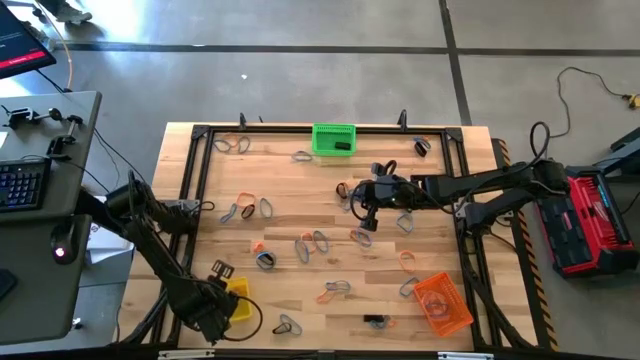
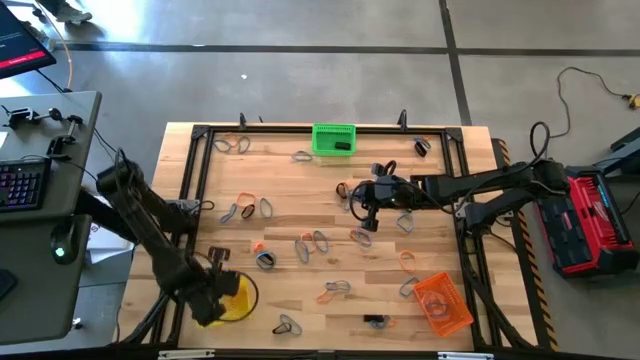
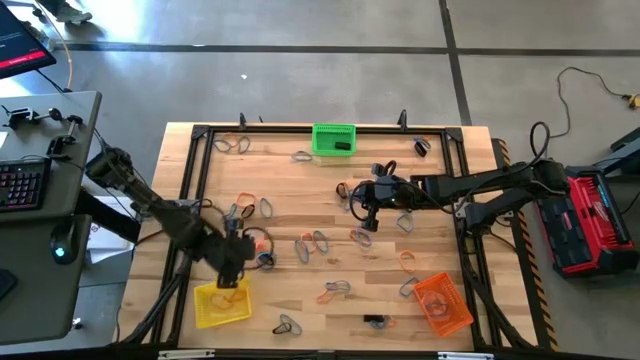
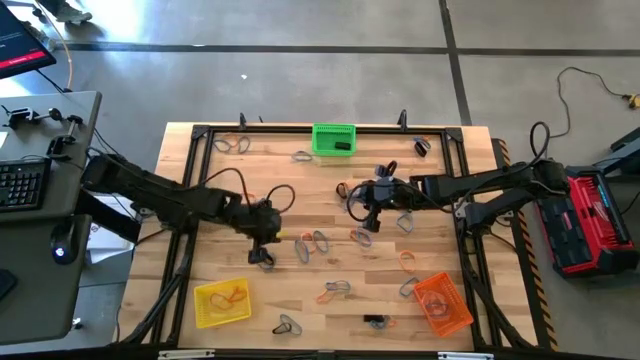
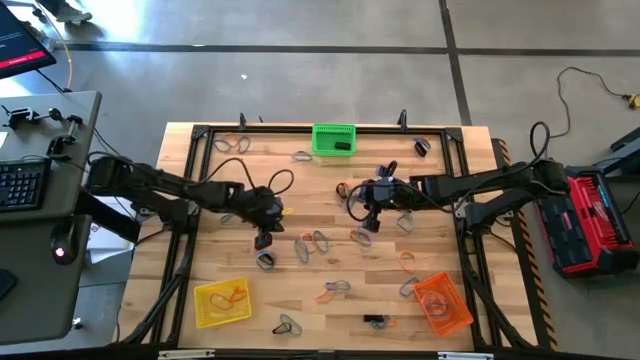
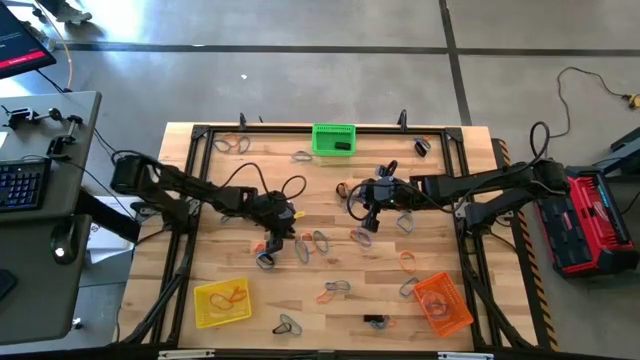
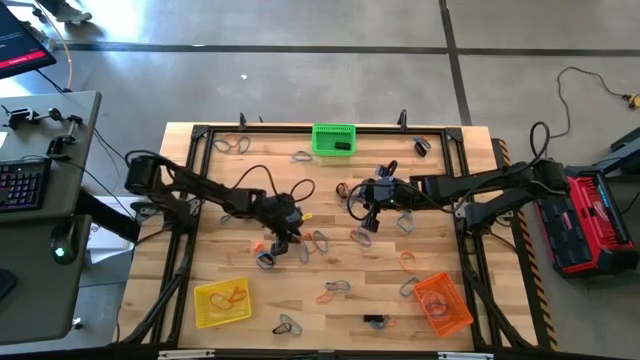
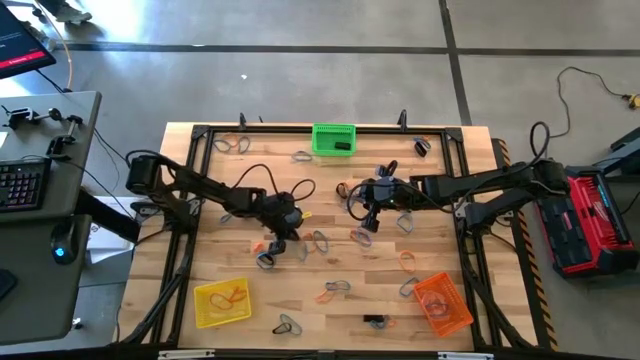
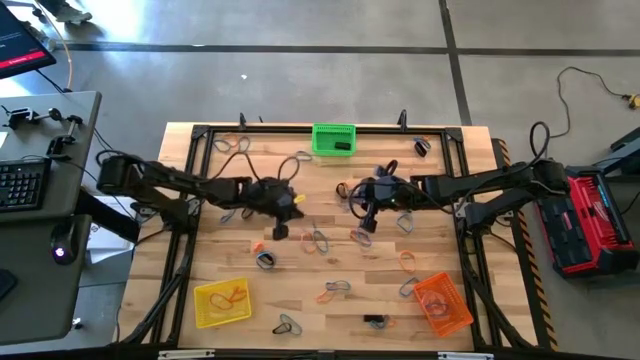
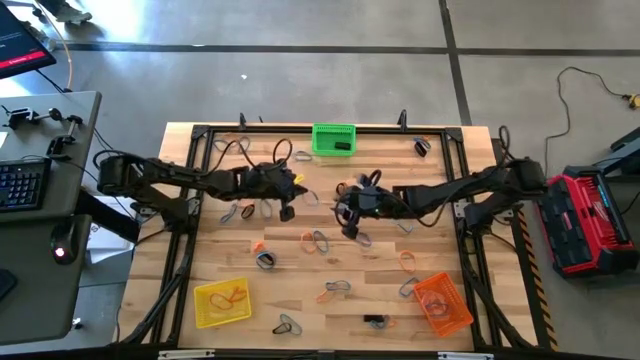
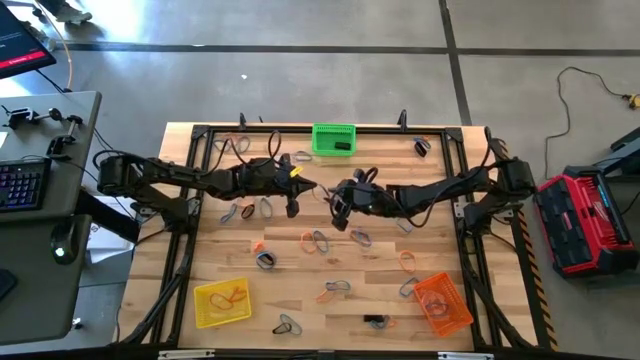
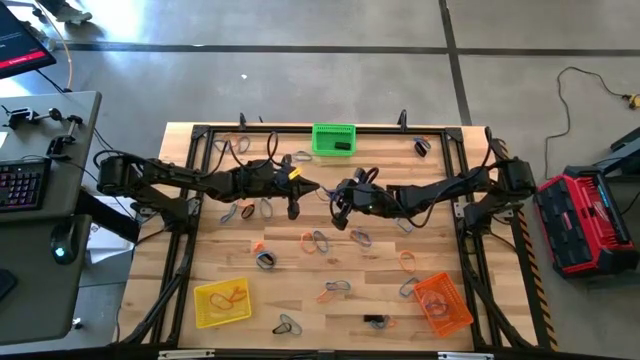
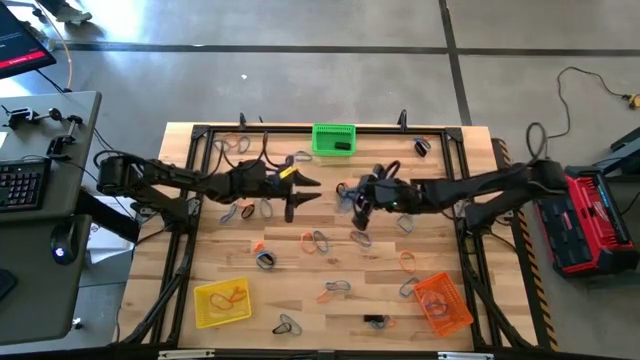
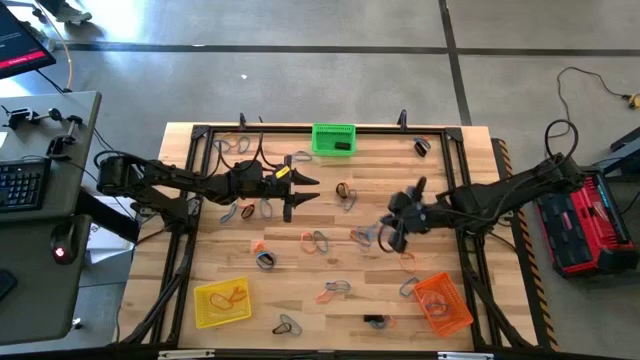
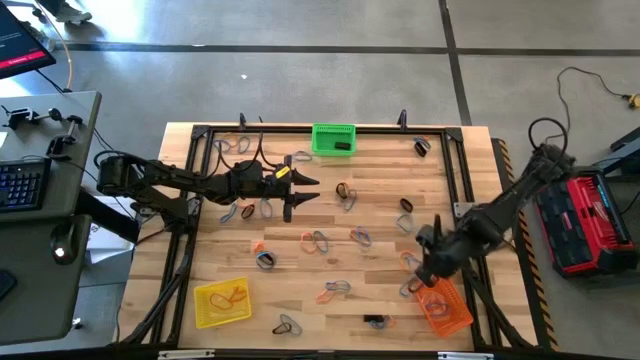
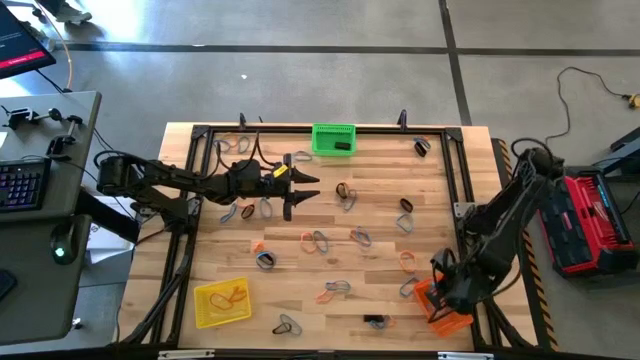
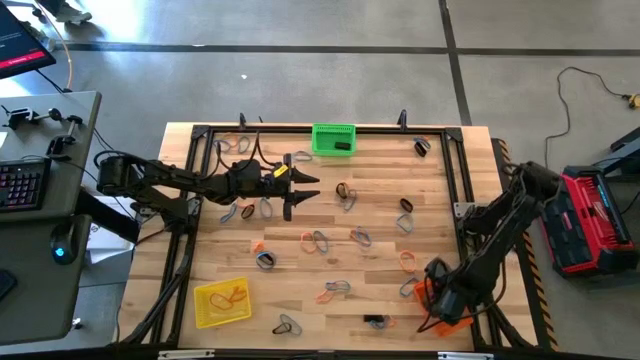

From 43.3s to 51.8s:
Task: Sort rubber bands into baskets
Put the blue rubber band into the orange bin

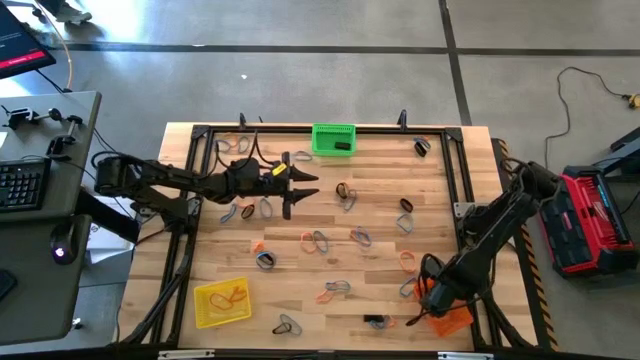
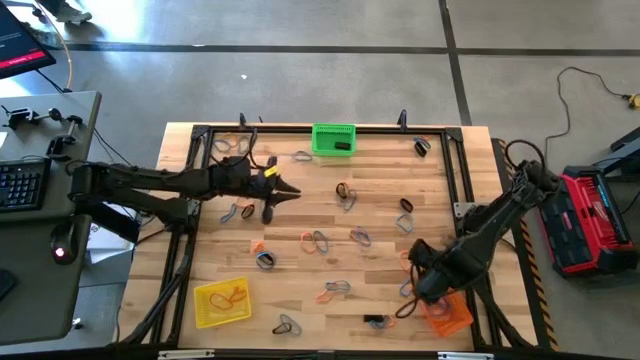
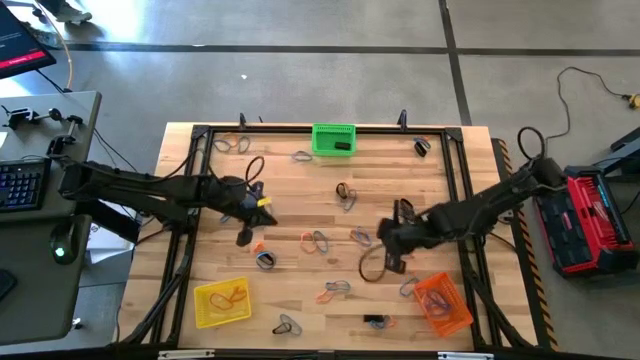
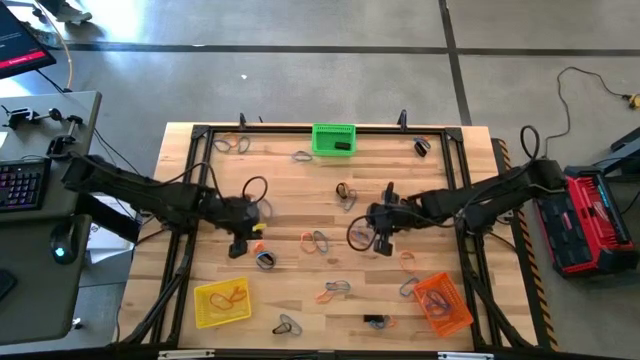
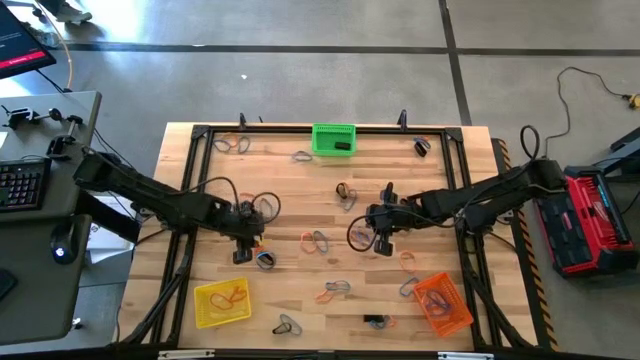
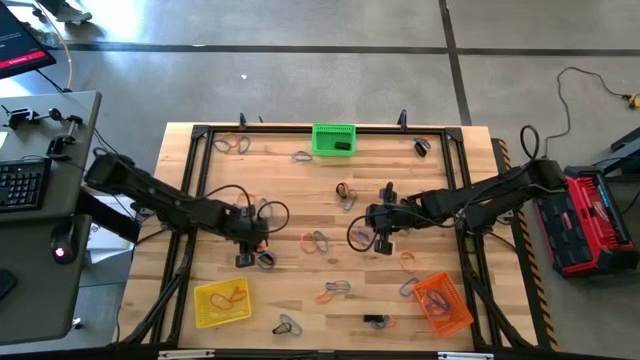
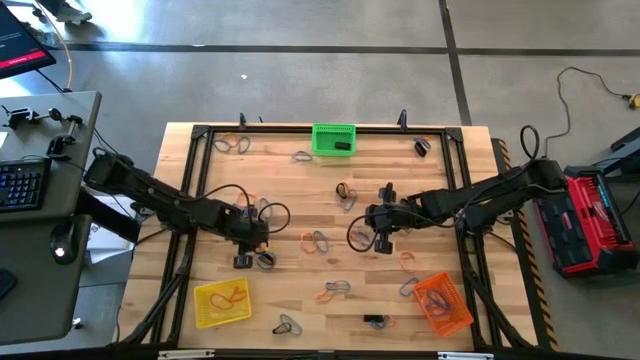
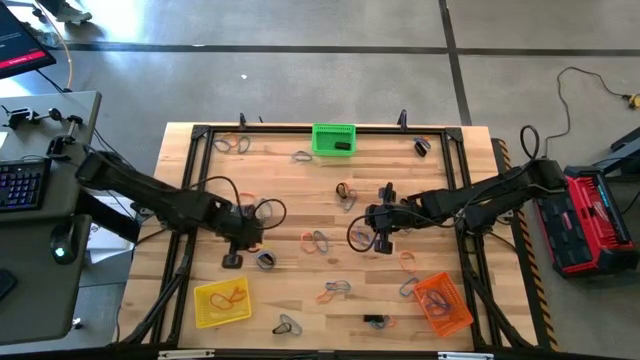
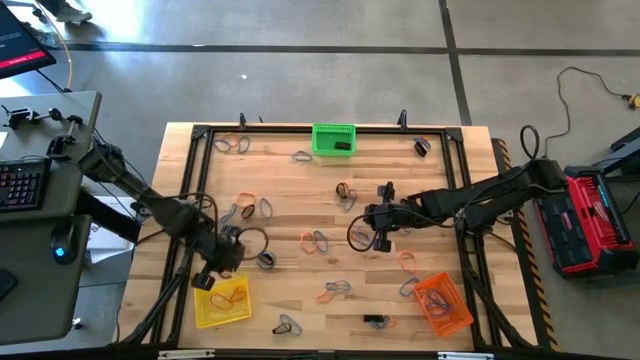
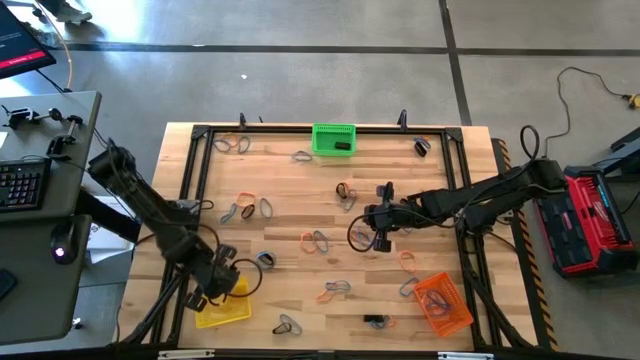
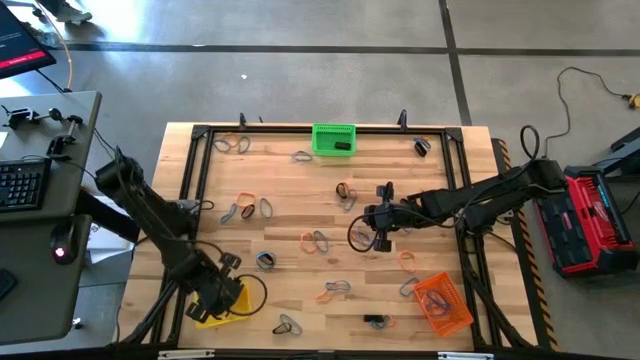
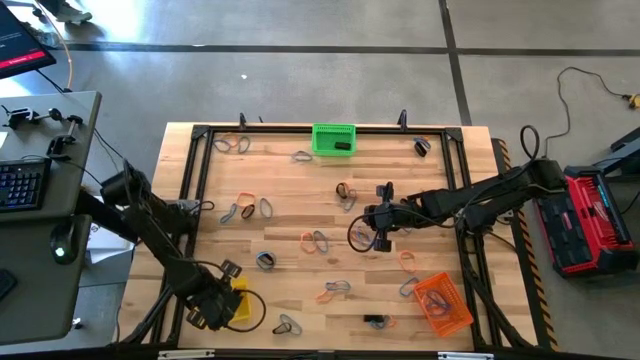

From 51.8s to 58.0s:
Put the orange rubber band into the yellow bin

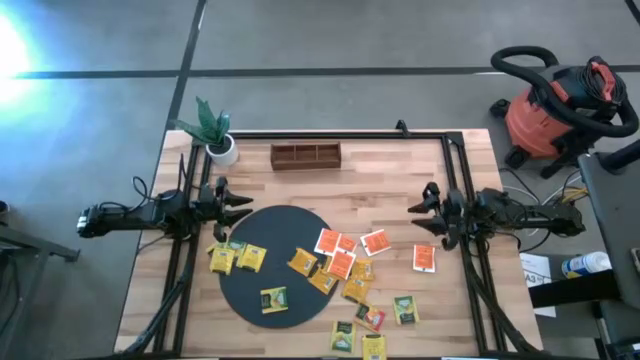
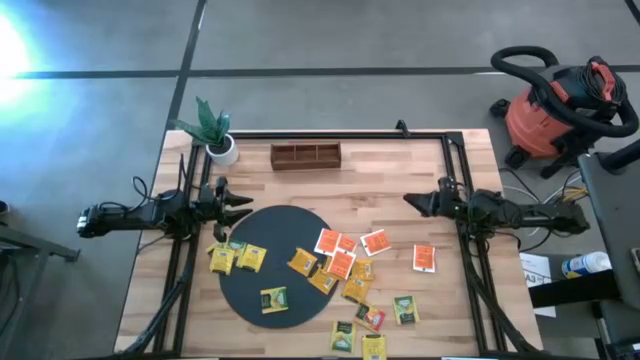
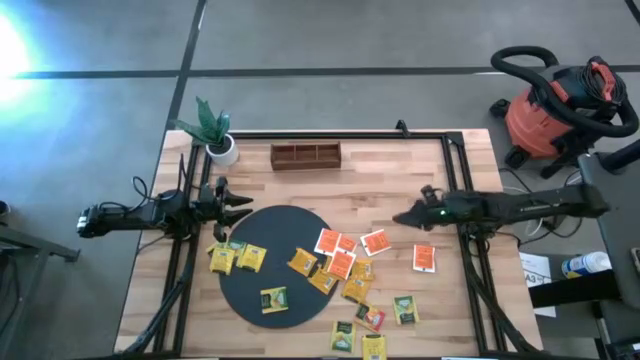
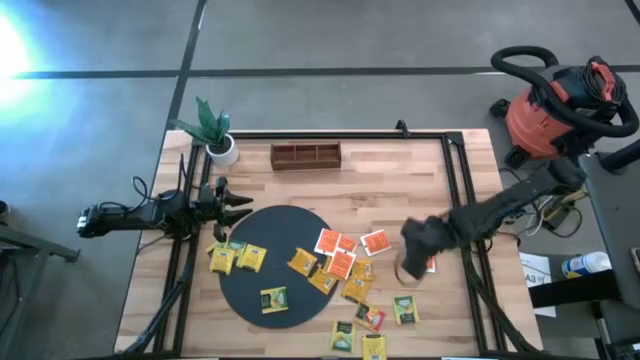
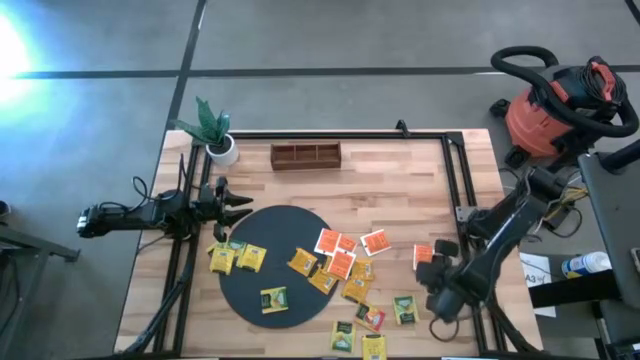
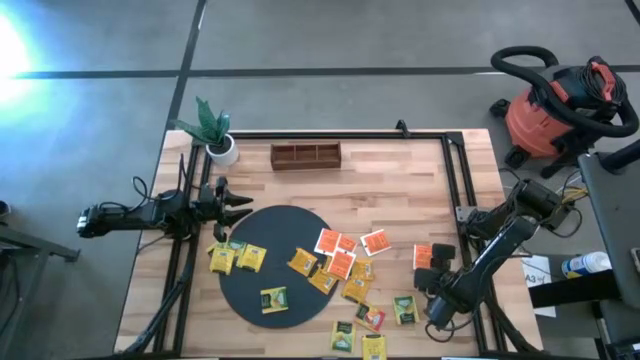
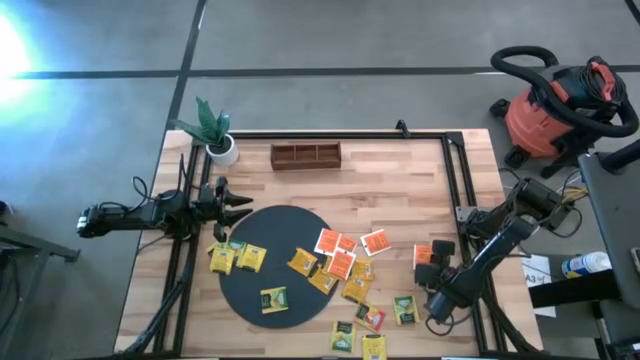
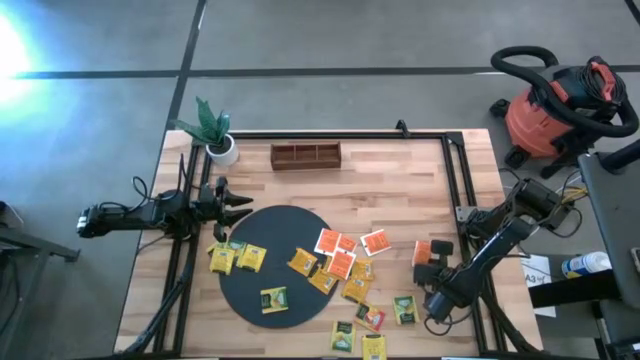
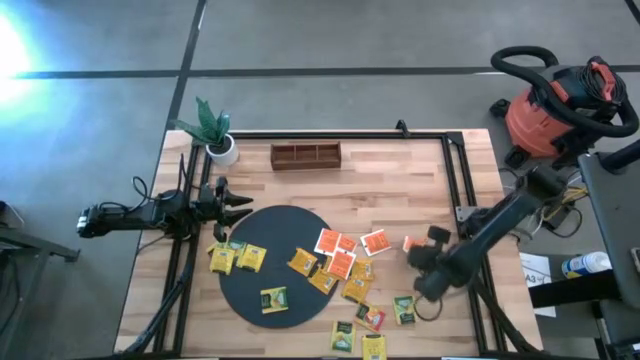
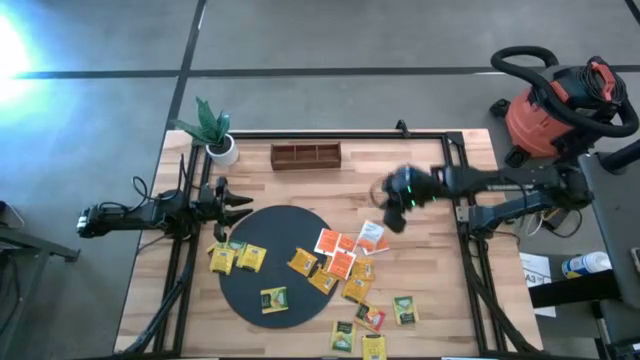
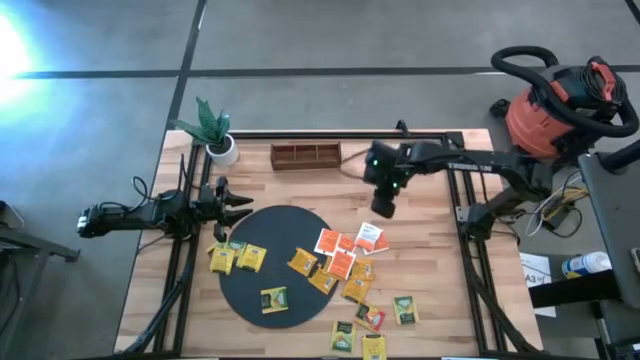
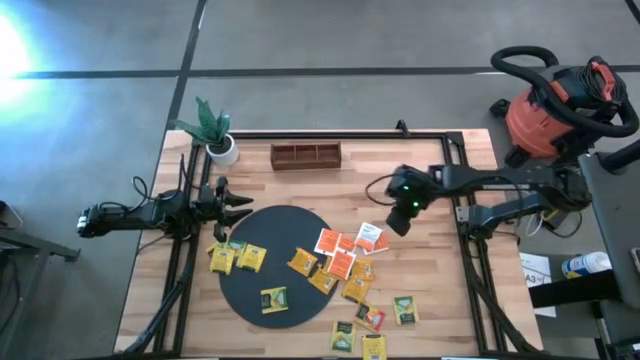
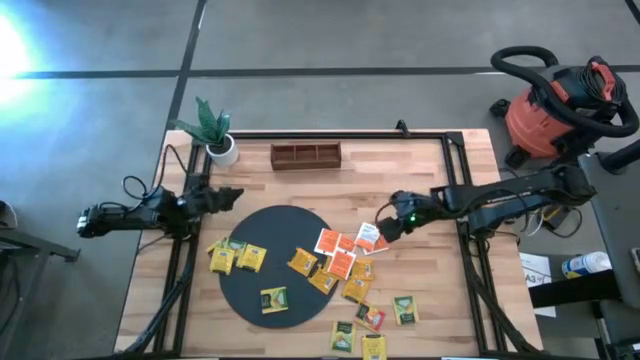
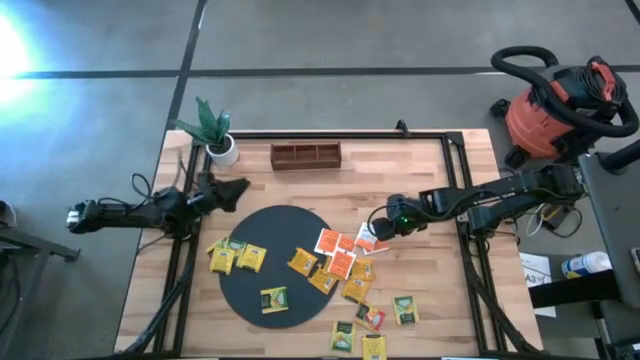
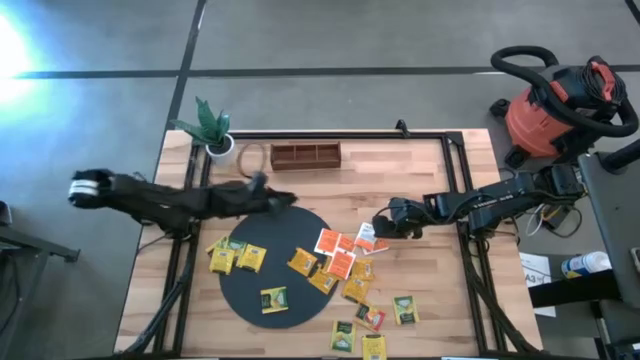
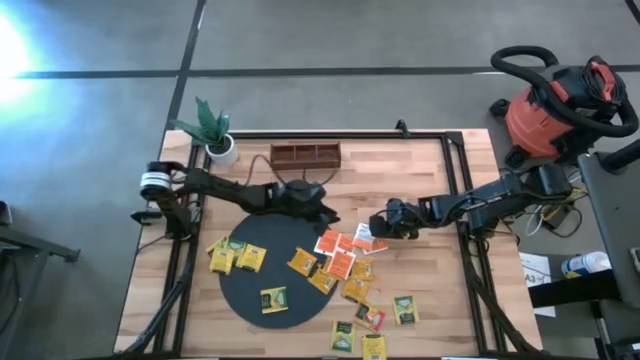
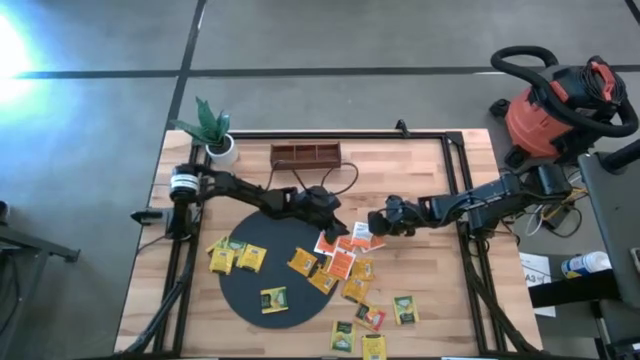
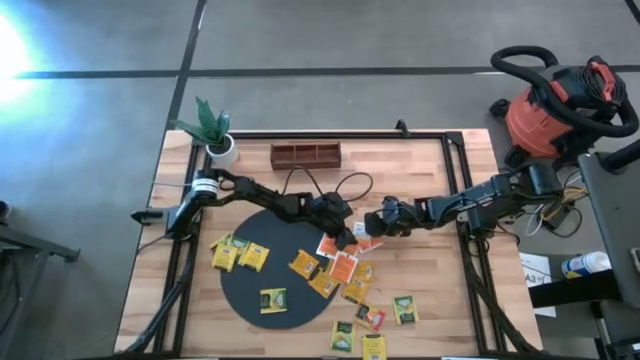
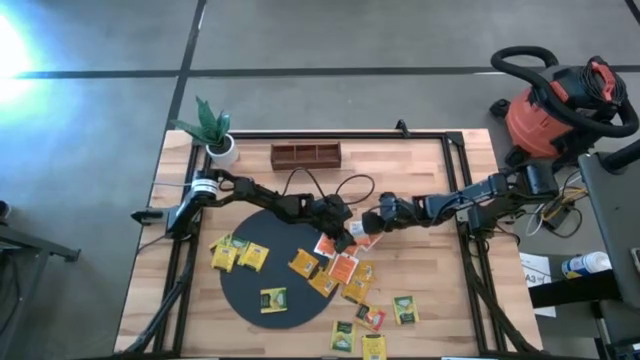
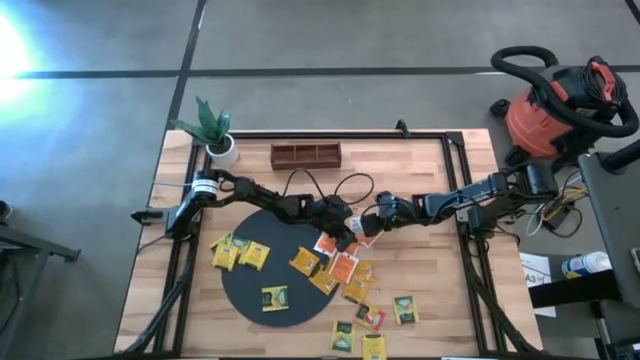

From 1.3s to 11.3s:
Task: Pick & Place Tea
Put the white tea bag into the right section of the wooden organizer
